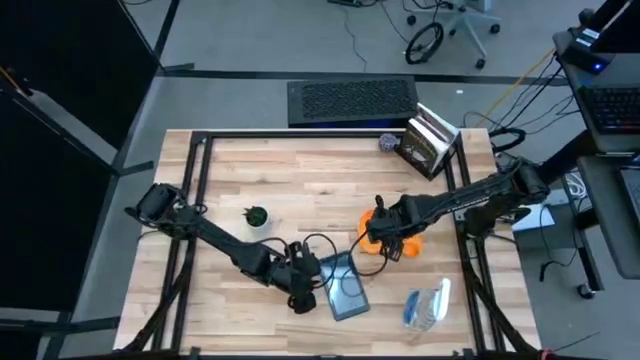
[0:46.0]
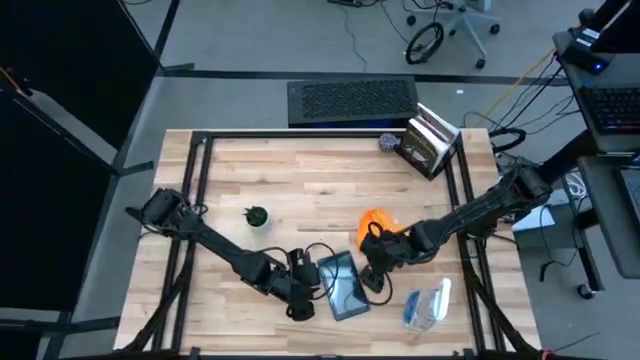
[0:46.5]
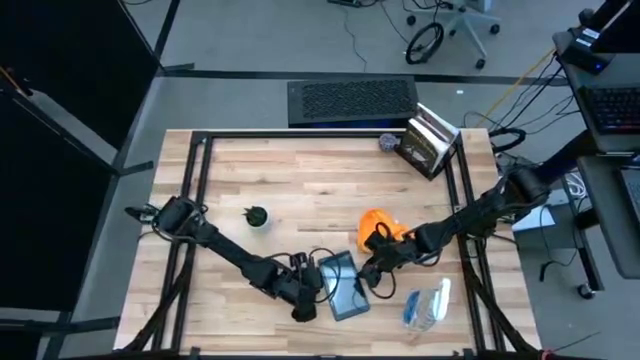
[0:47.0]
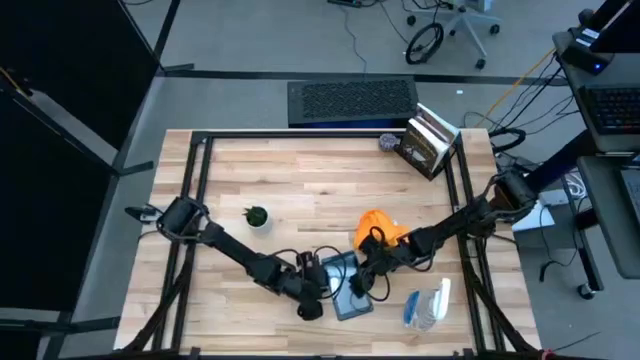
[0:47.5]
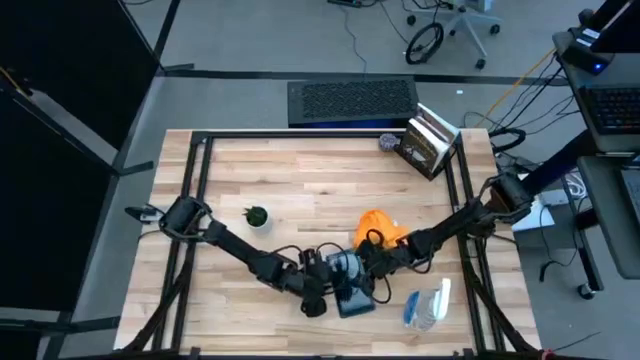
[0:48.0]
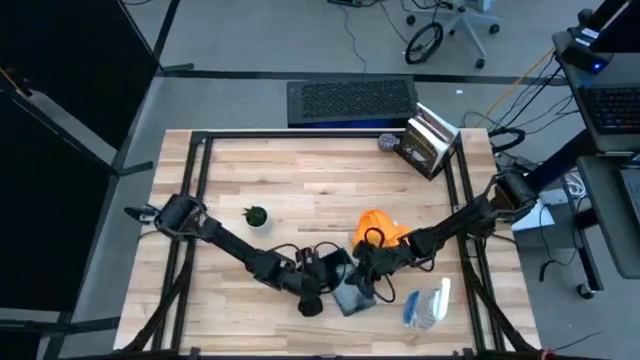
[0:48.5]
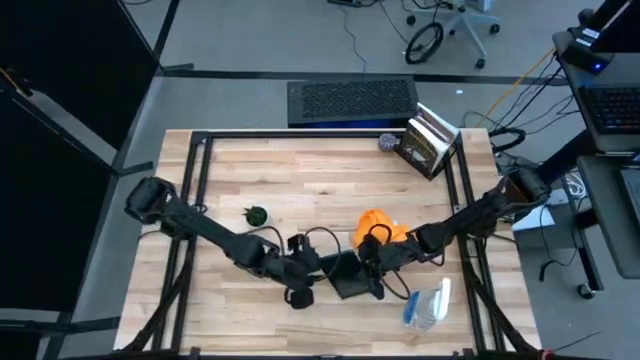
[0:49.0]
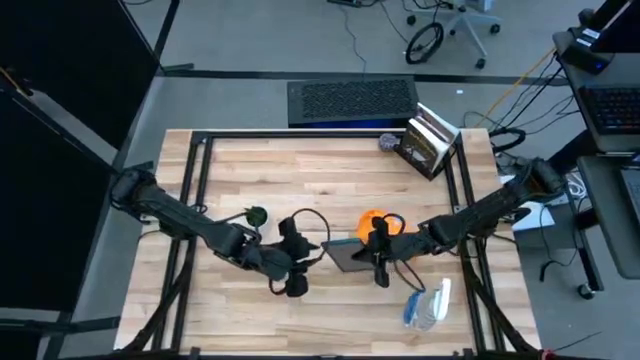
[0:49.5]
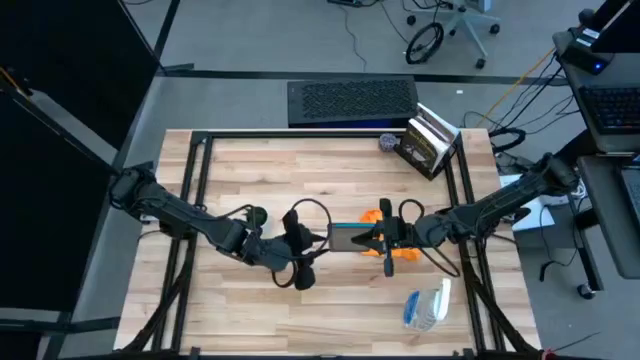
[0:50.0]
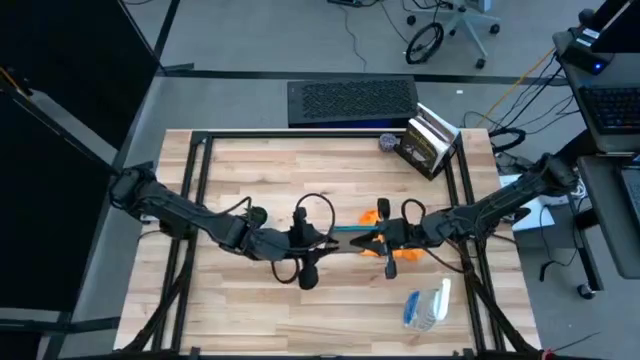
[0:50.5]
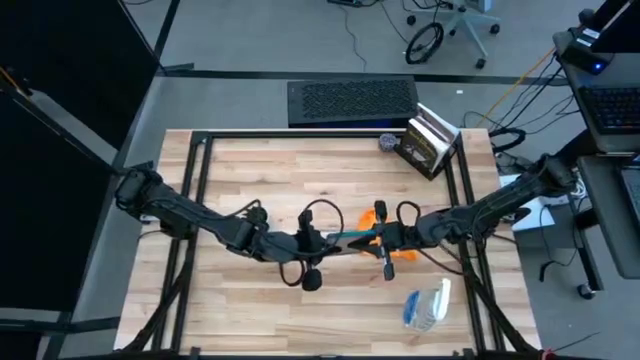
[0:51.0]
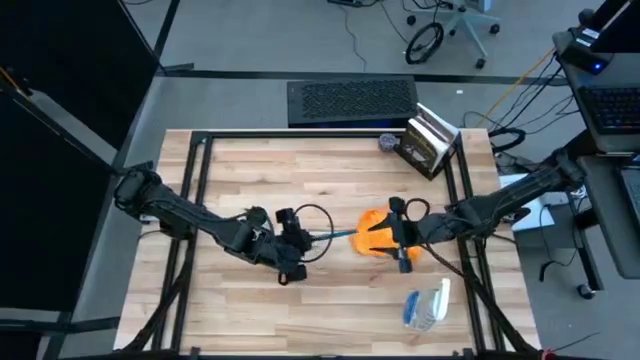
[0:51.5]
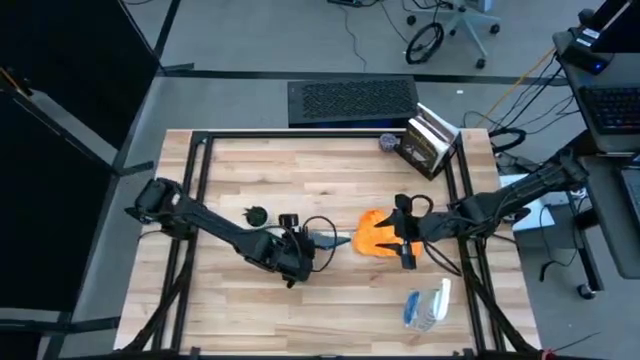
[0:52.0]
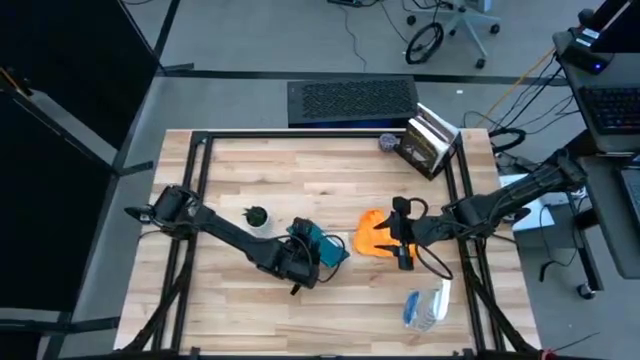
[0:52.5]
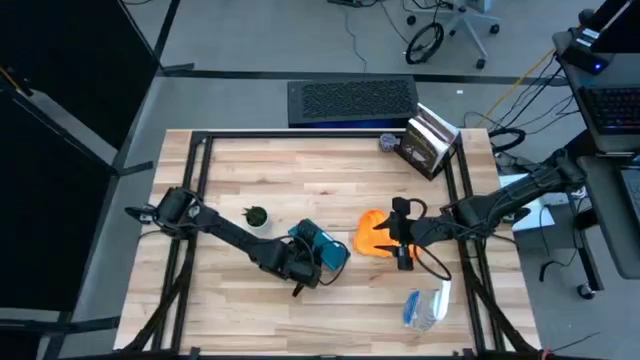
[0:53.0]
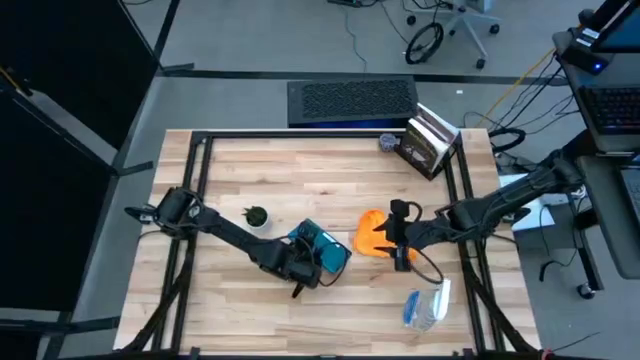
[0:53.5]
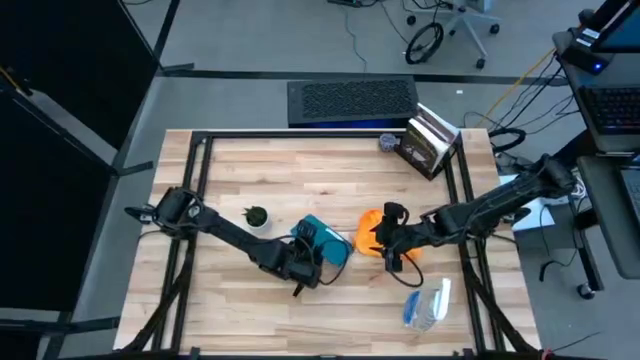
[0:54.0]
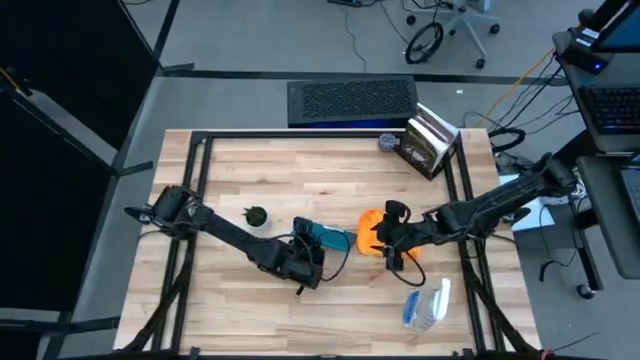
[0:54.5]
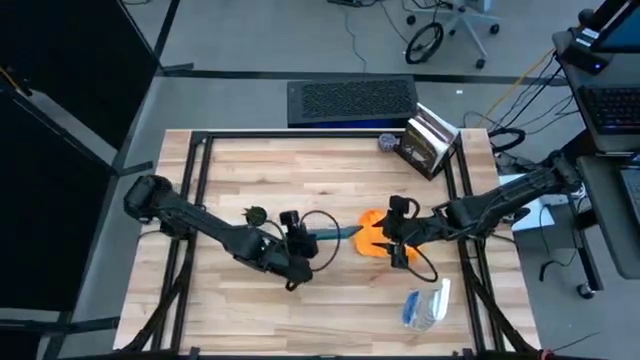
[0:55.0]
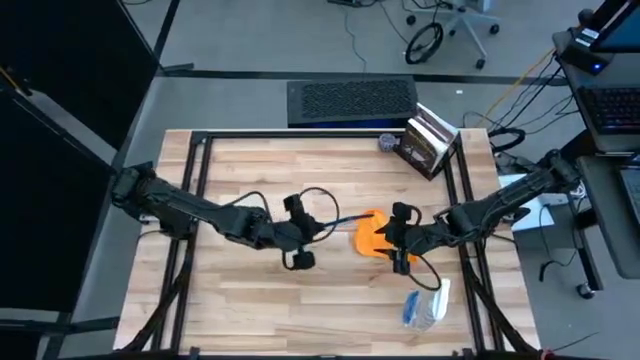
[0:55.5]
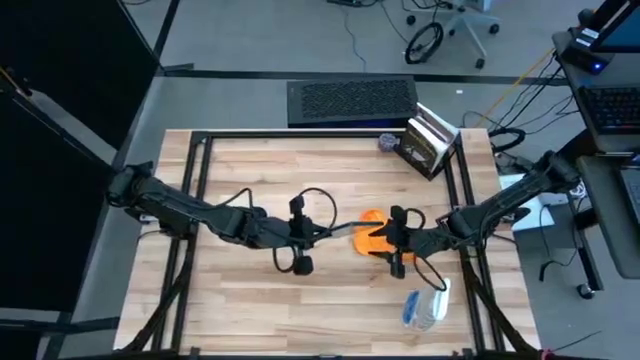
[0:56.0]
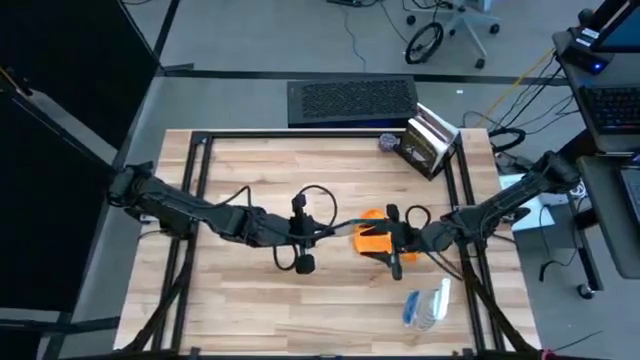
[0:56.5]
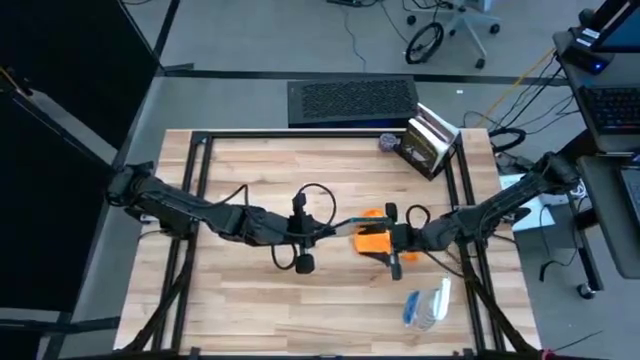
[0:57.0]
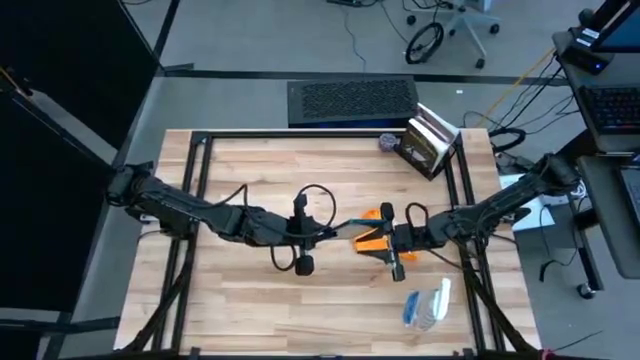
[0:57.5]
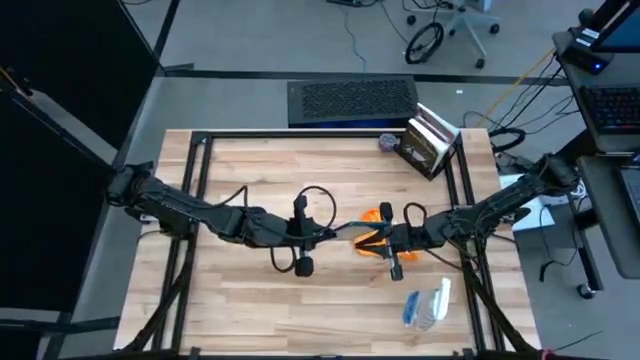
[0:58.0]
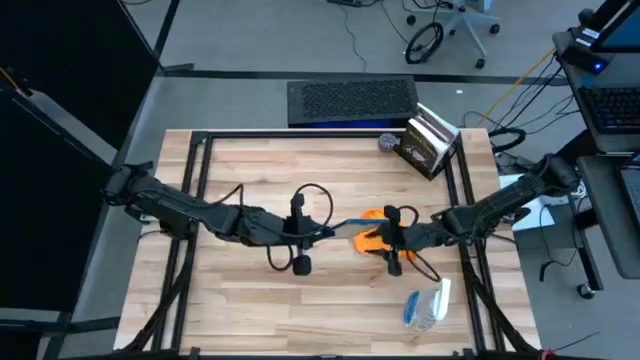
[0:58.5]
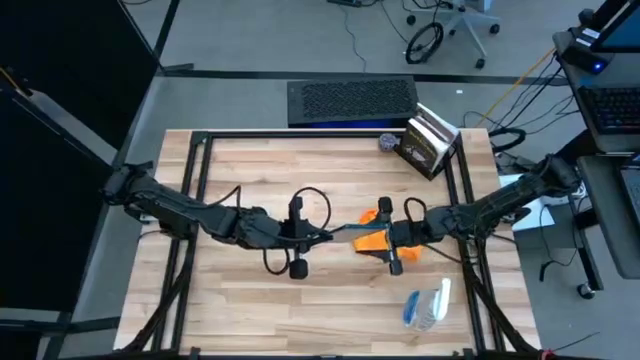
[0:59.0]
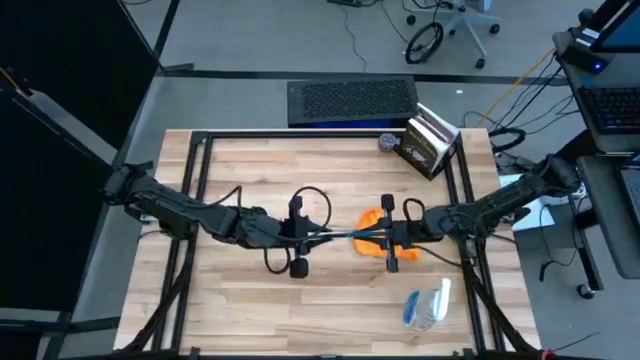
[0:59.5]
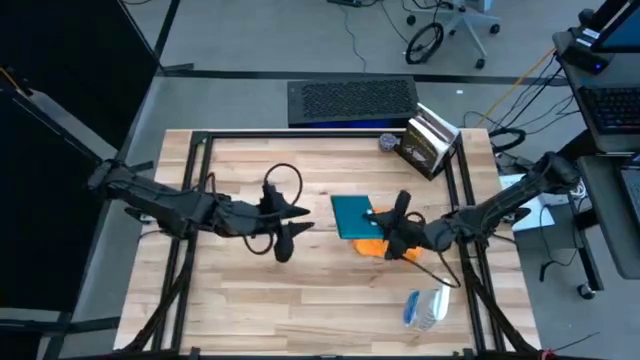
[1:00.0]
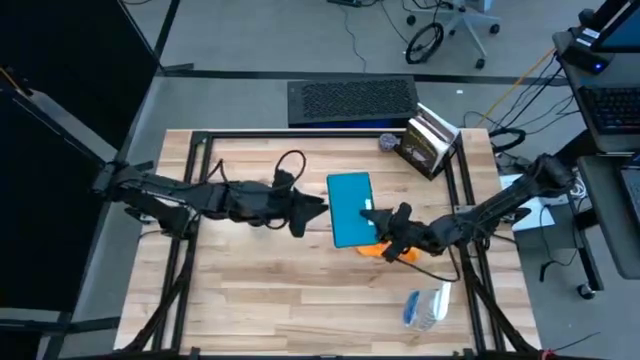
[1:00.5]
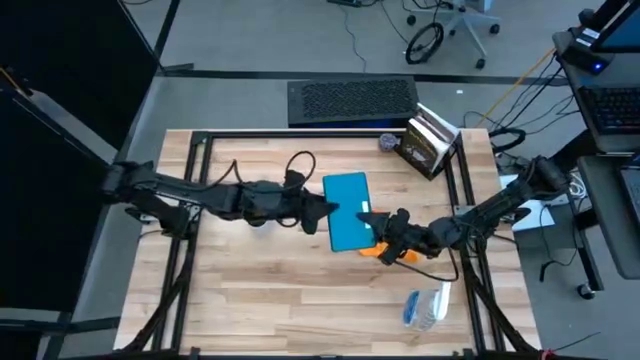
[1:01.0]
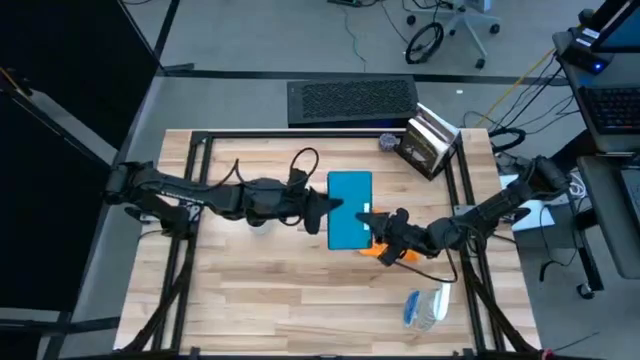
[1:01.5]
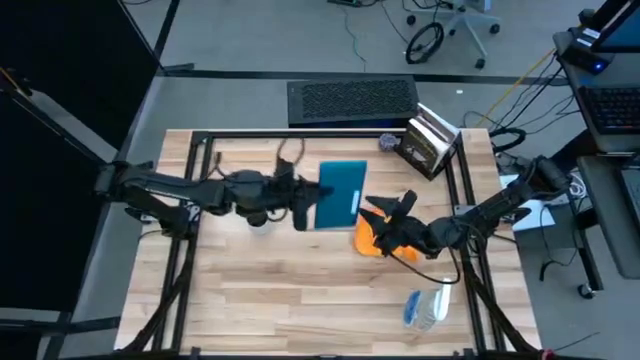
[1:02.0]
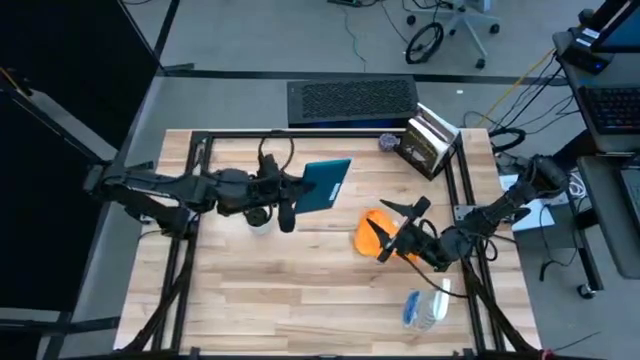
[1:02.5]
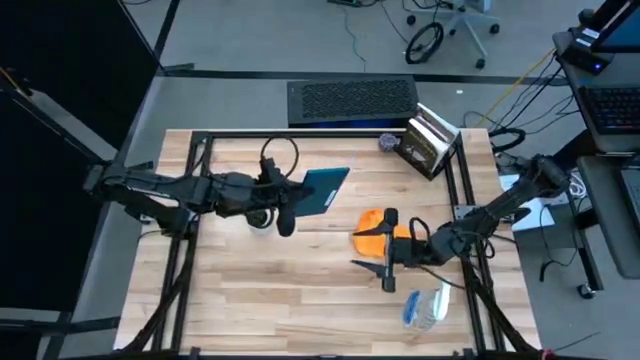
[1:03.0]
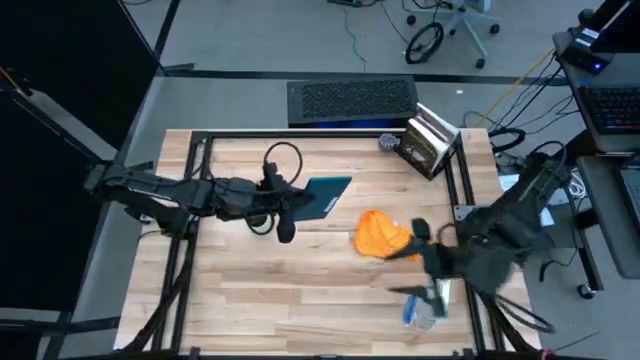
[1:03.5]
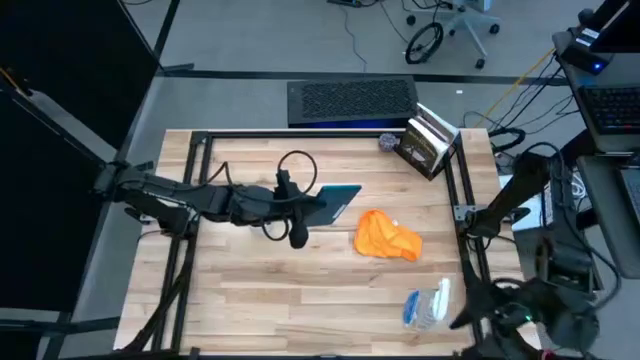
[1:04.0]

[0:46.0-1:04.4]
Task: Apply microfiber cloth
Spray the blue tablet with the transparent spray bottle

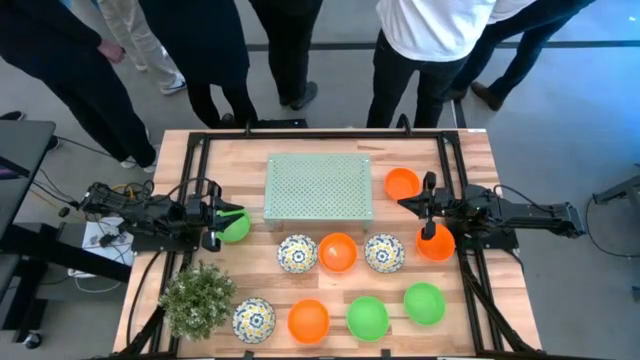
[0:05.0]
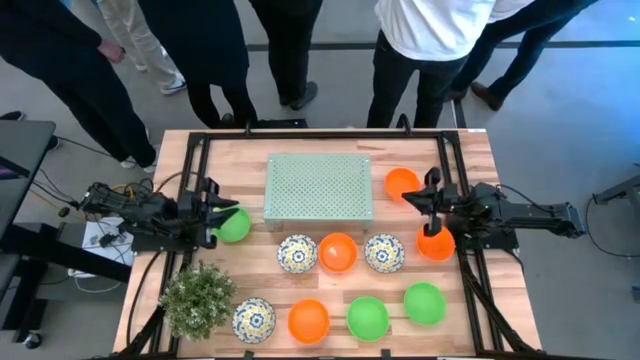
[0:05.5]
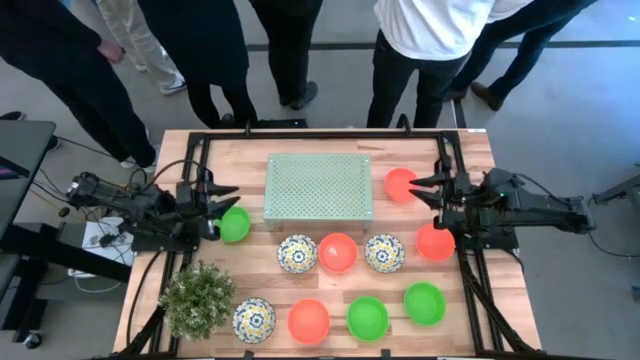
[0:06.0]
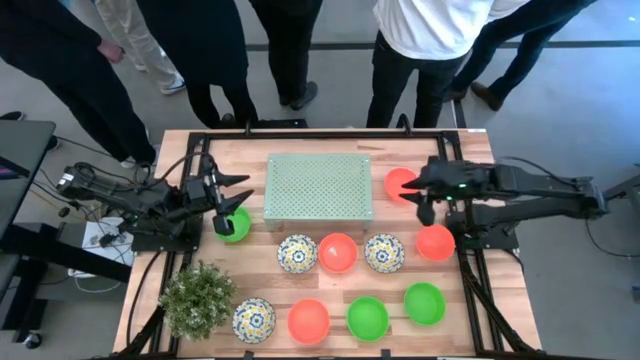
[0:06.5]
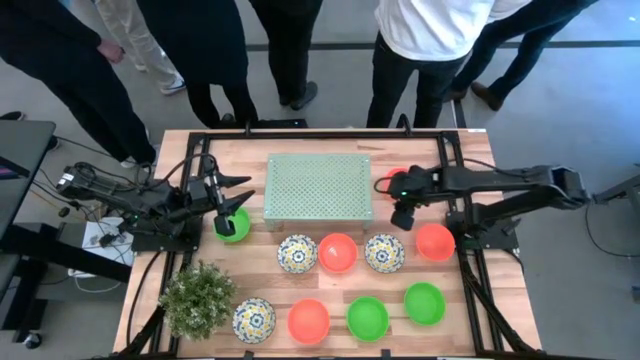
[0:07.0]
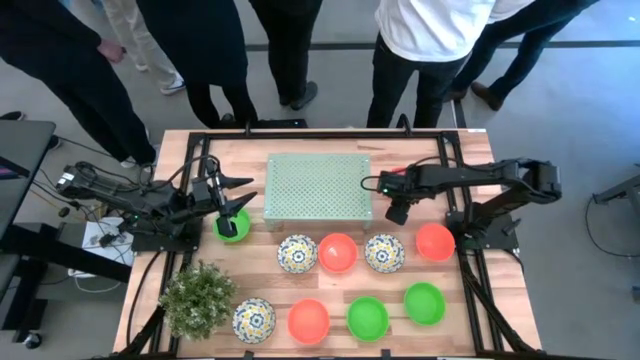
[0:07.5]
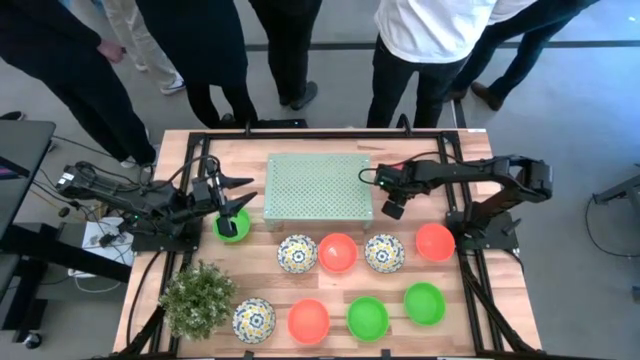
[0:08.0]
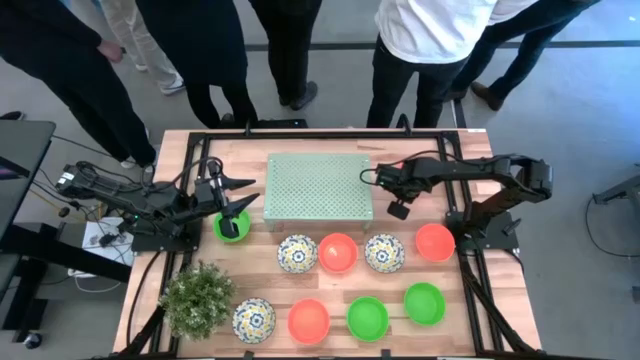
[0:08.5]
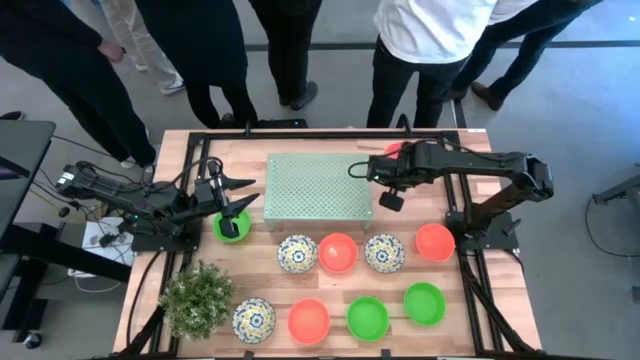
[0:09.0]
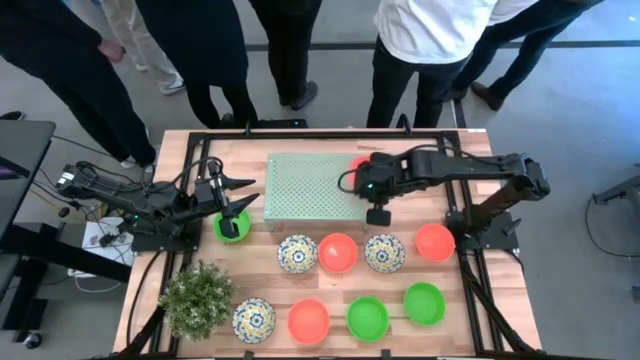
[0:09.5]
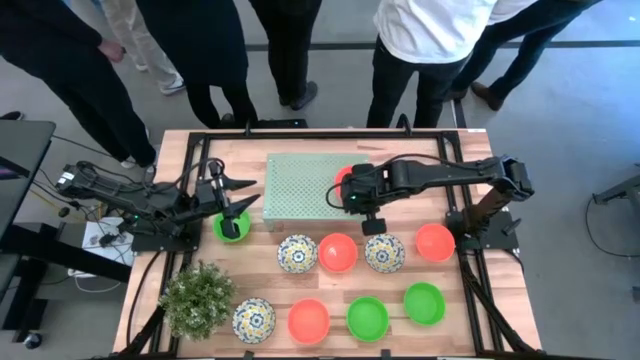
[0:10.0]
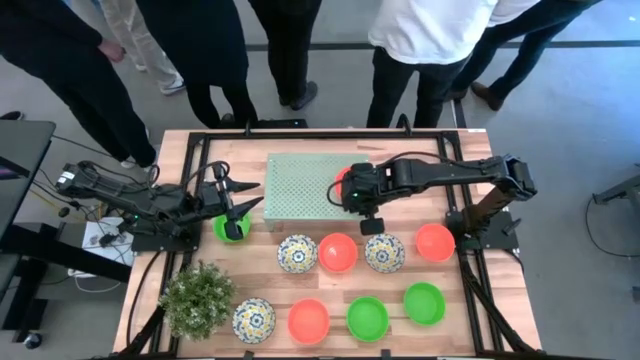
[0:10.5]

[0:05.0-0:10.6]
Task: Pick & Place Mini bowls
Put the orange bowl on the shelf
